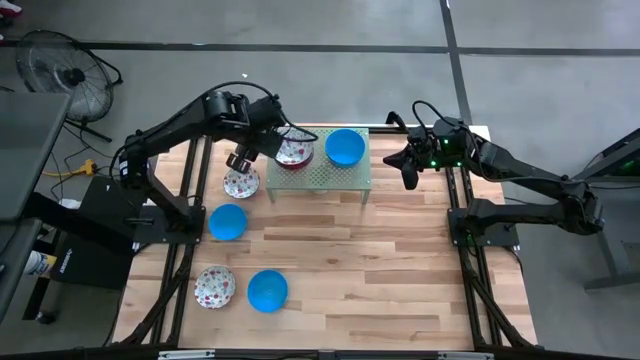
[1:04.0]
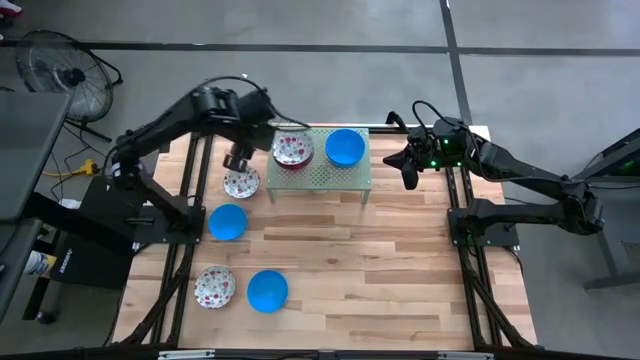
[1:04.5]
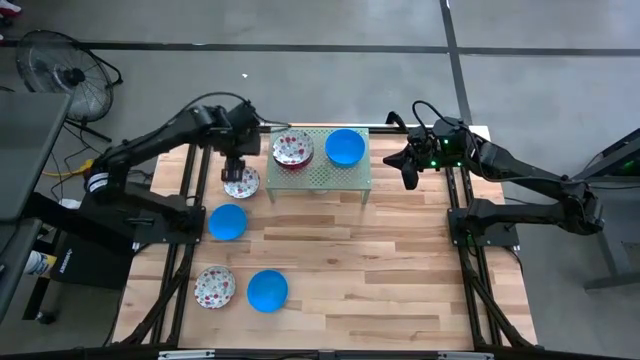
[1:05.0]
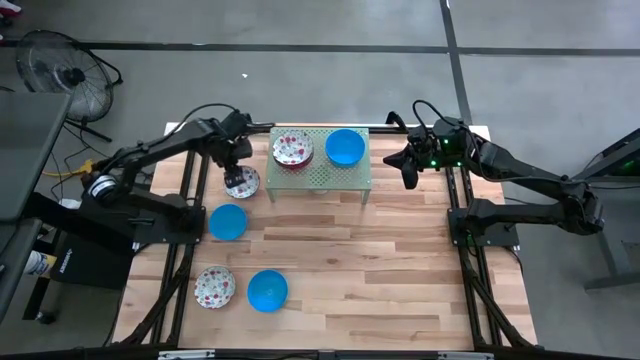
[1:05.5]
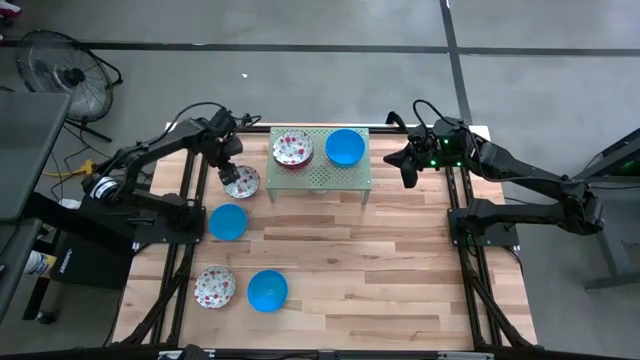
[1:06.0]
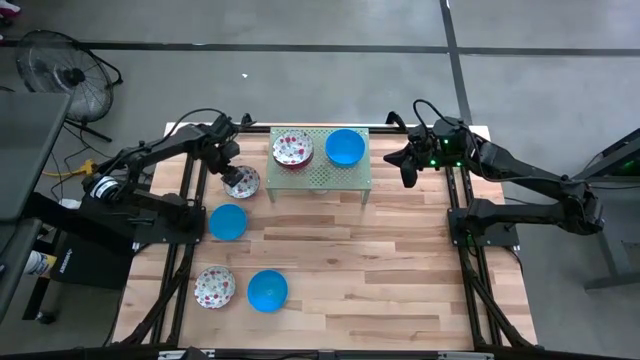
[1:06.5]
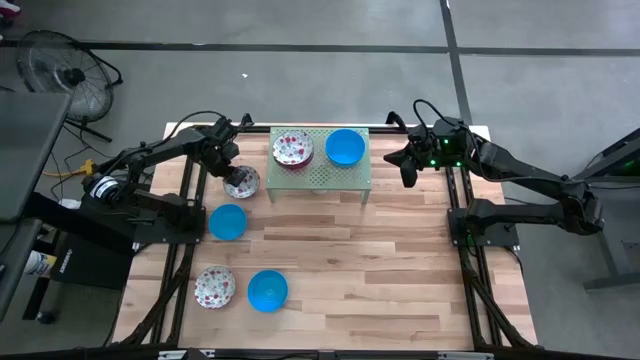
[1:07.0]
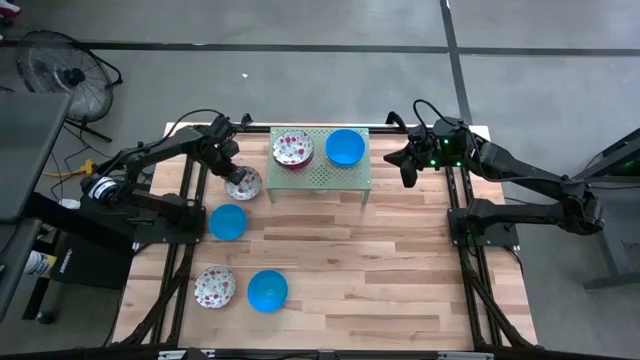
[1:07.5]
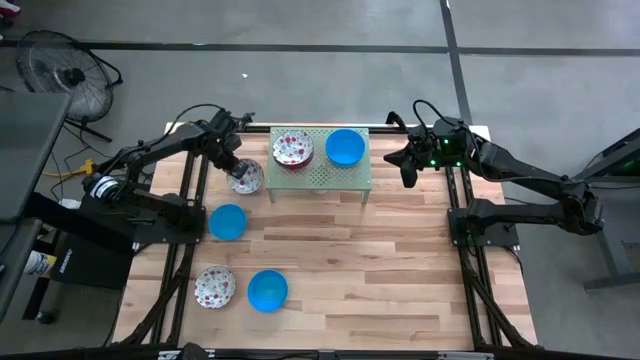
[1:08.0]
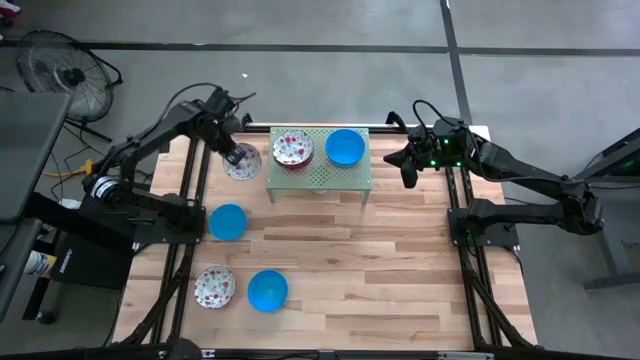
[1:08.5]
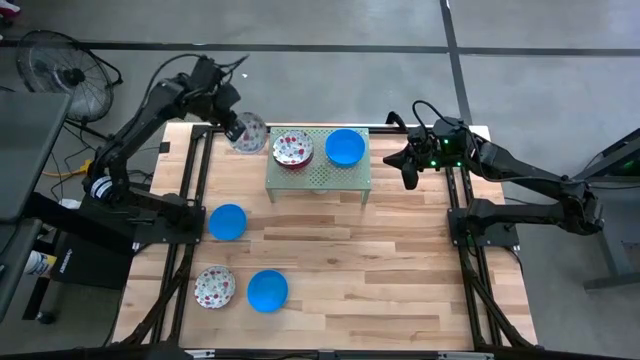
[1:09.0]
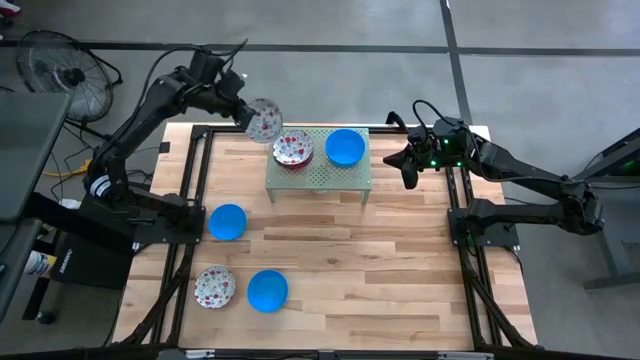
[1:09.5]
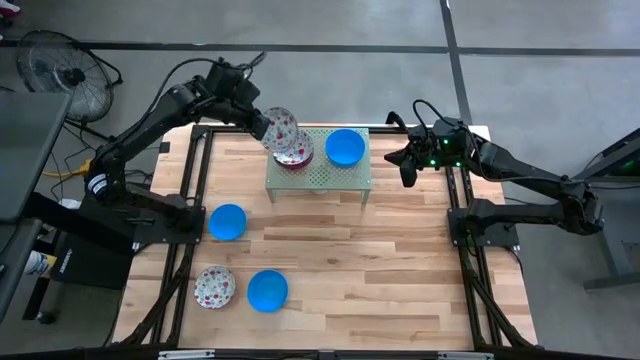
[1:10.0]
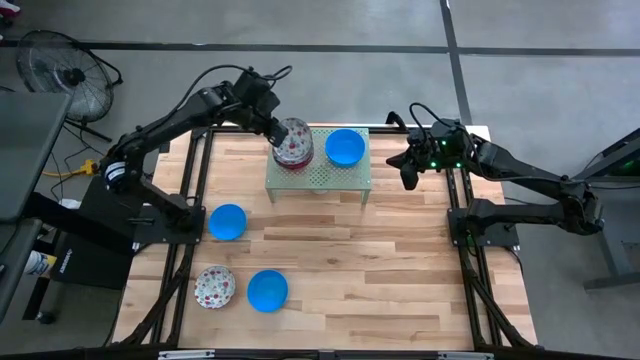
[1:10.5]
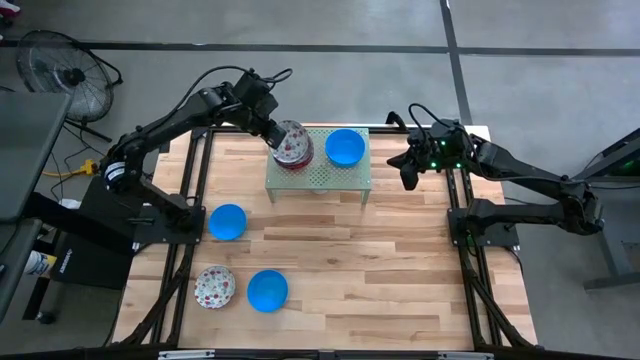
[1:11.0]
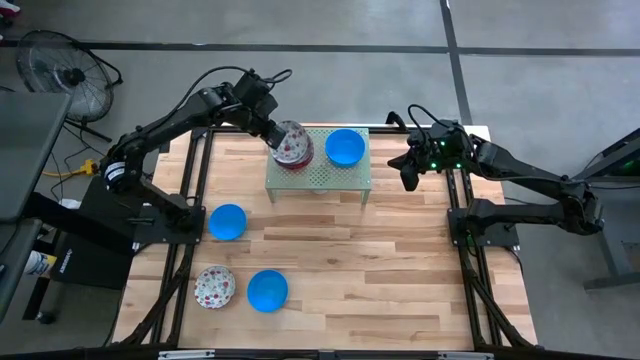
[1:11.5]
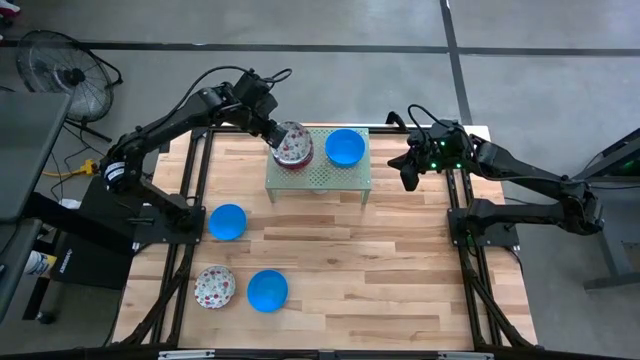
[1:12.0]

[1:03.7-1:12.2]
Task: Pick & Place Mini bowls
Stack the red patterned bowl on the red patterned bowl on the shelf

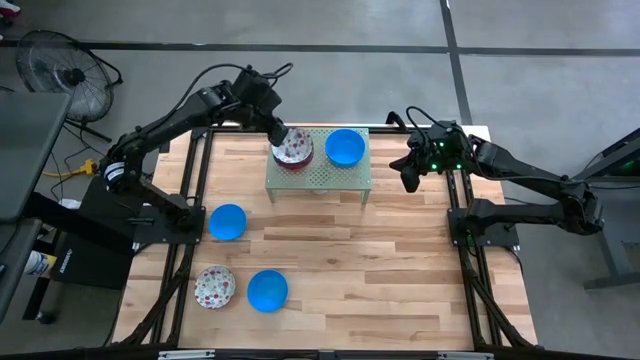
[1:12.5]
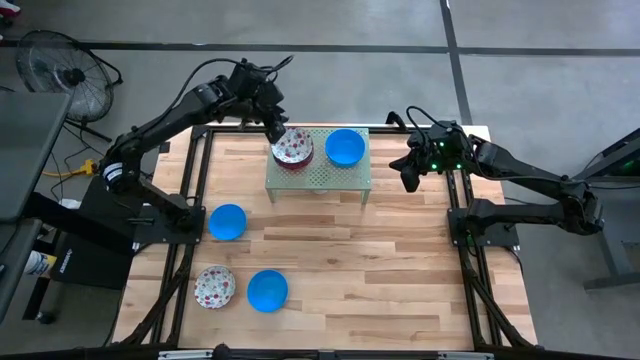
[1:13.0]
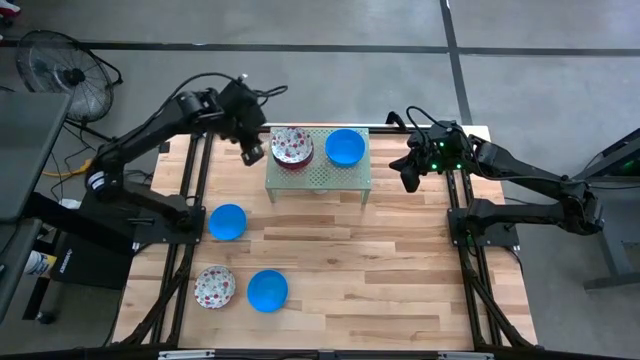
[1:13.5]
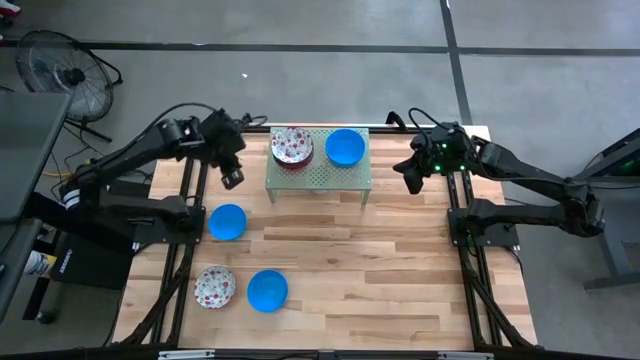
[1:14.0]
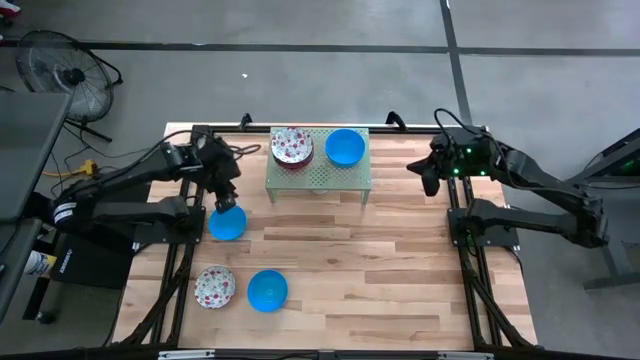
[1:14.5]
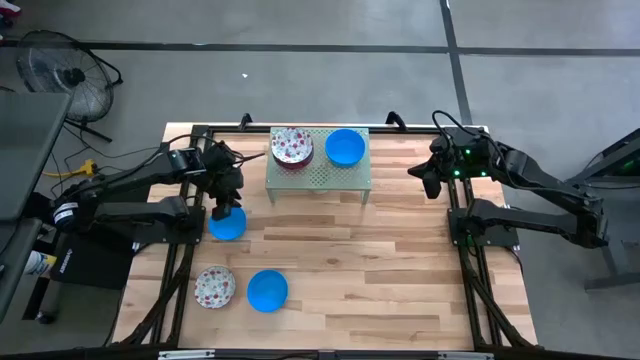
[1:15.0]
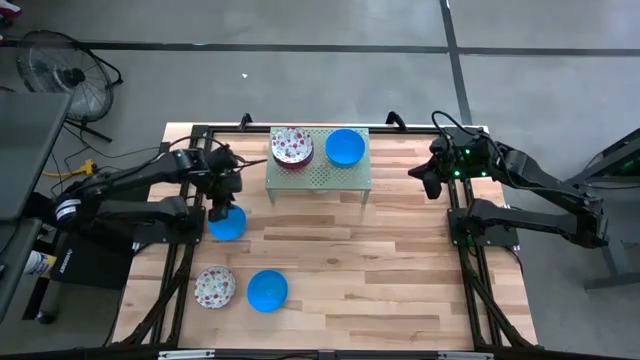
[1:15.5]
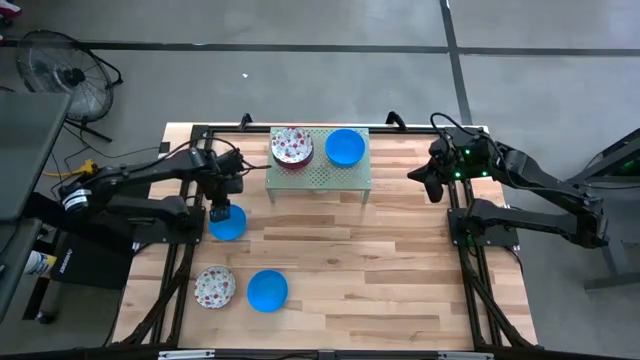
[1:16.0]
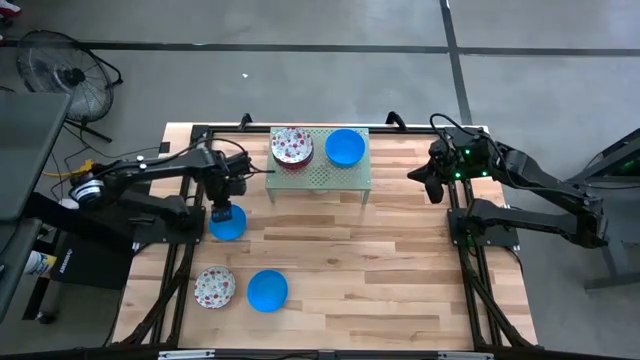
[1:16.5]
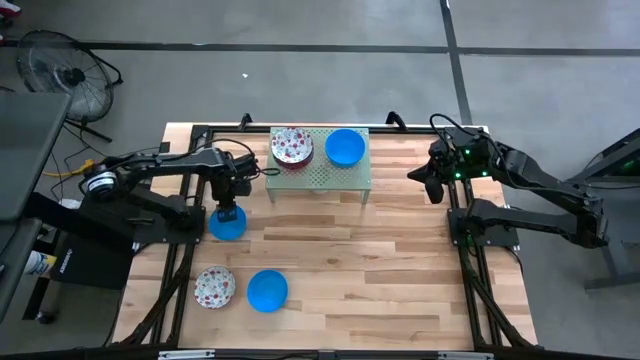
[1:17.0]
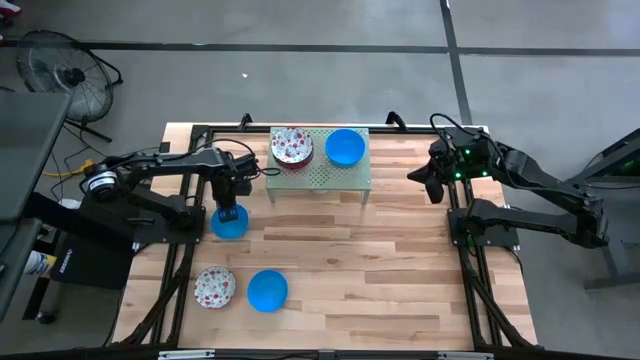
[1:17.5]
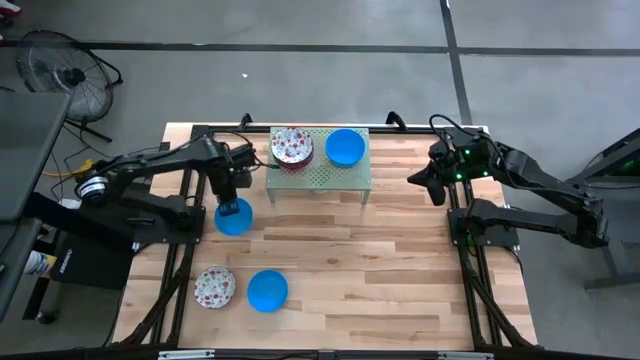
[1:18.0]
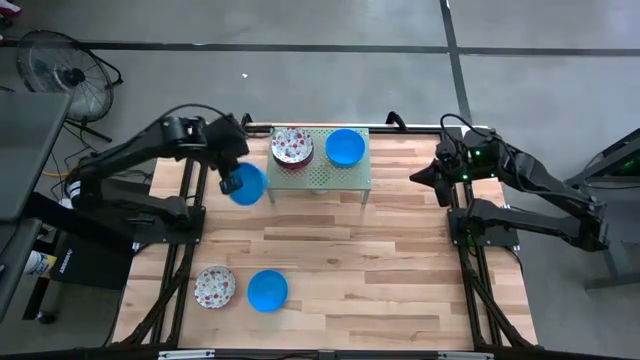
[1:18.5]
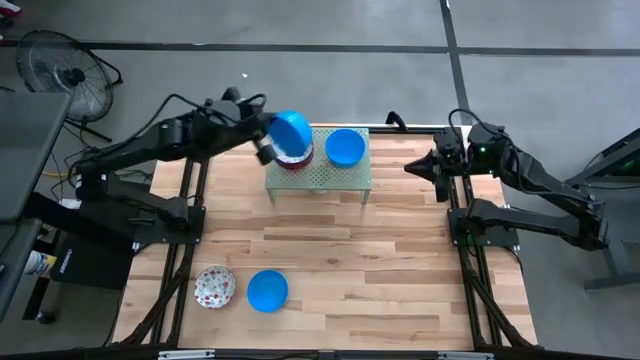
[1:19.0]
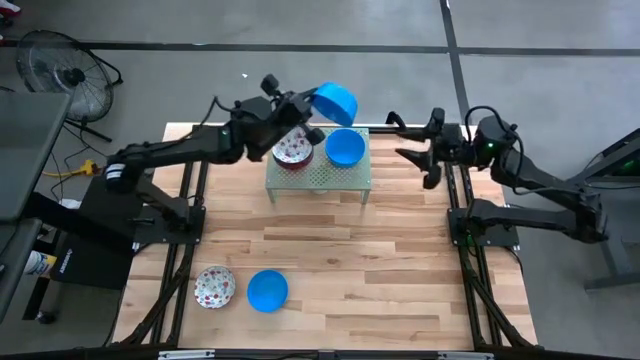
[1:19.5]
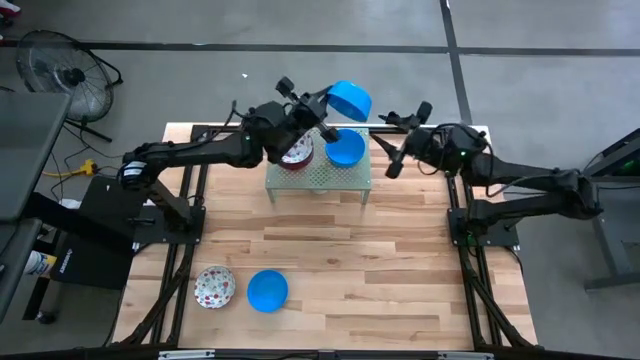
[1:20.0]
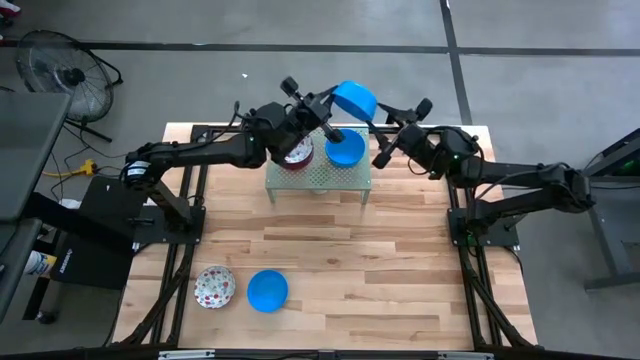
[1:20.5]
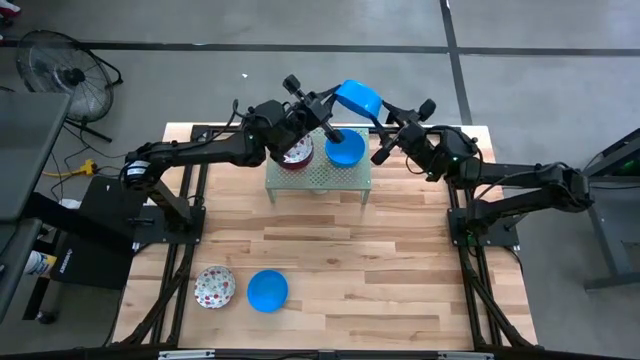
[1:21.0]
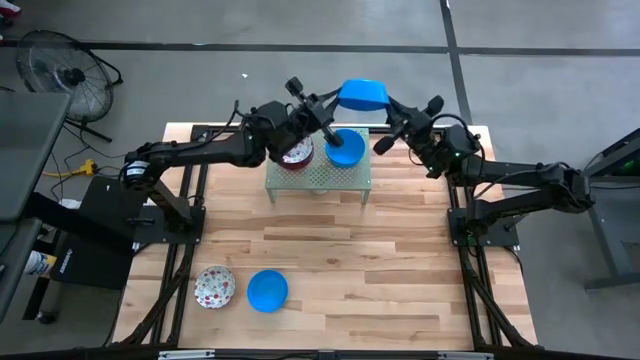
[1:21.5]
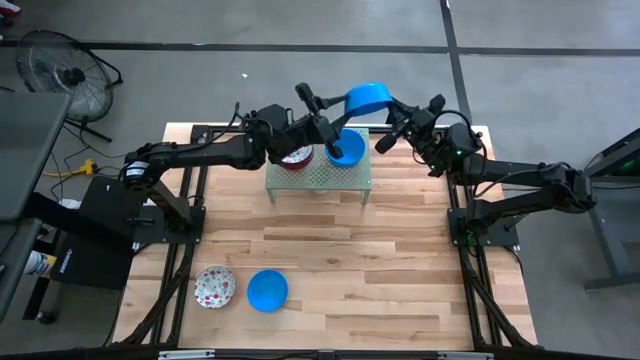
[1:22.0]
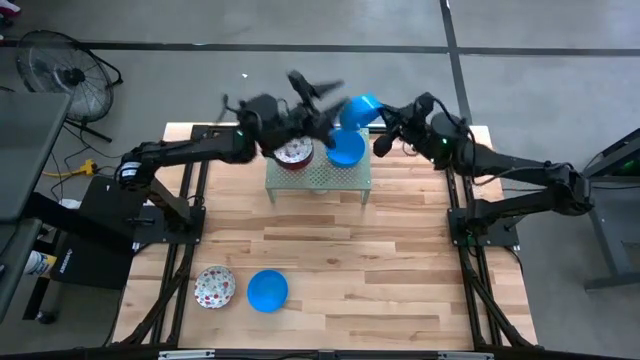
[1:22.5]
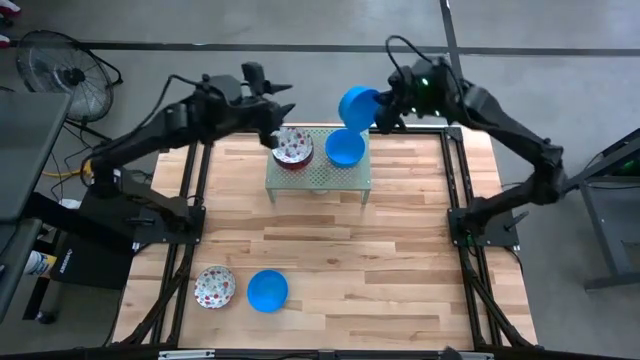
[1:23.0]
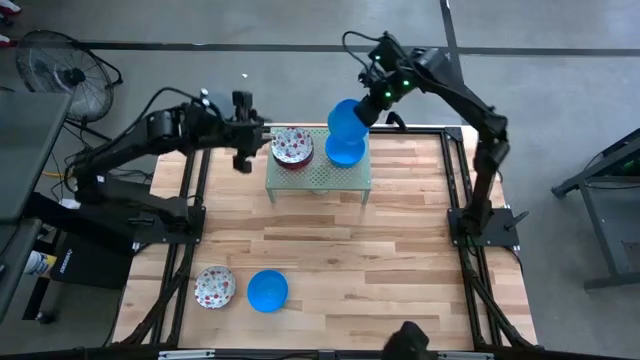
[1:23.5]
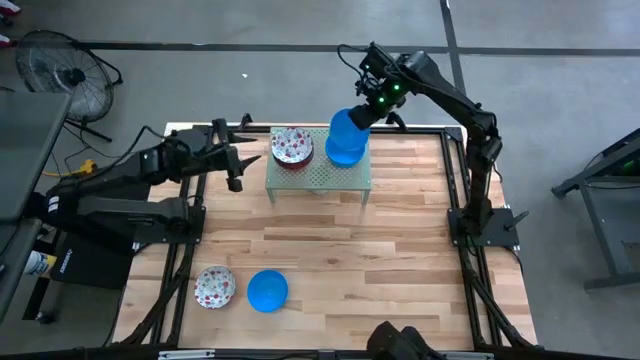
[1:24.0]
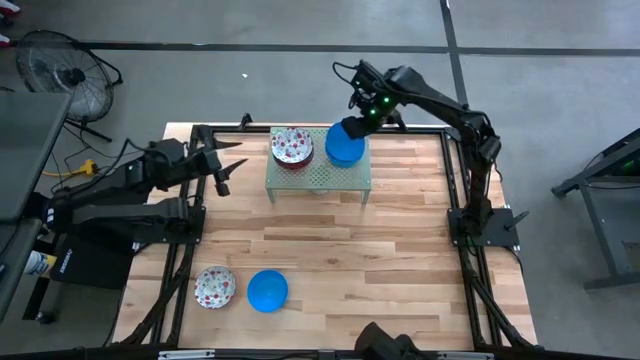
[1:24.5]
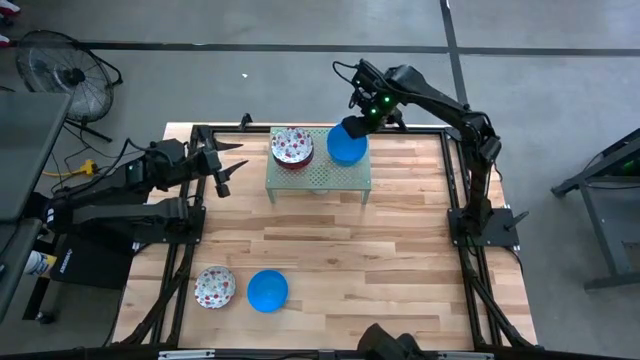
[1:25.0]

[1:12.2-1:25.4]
Stack the blue bowl on the blue bowl on the shelf
